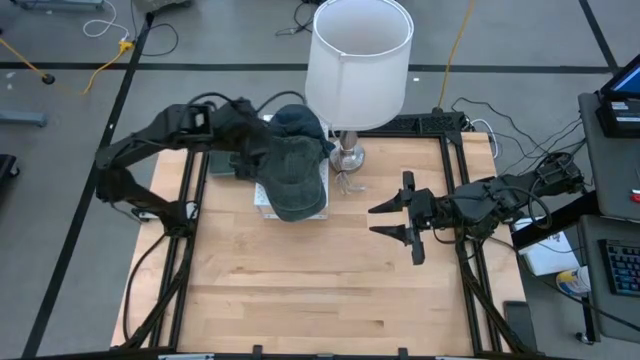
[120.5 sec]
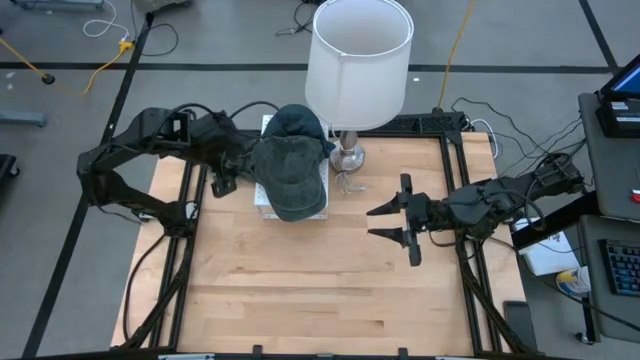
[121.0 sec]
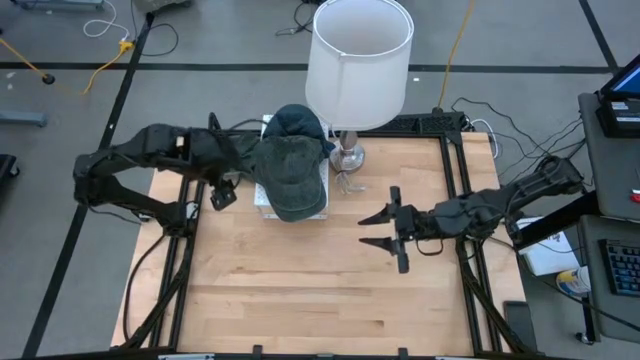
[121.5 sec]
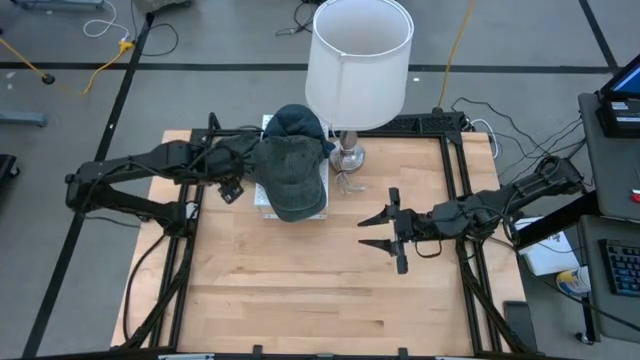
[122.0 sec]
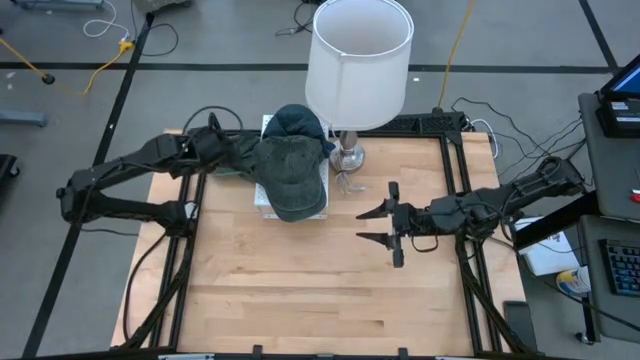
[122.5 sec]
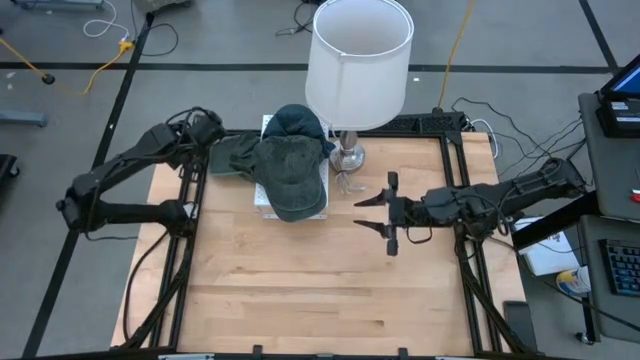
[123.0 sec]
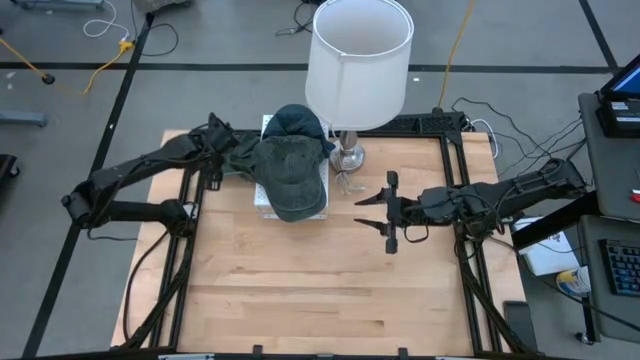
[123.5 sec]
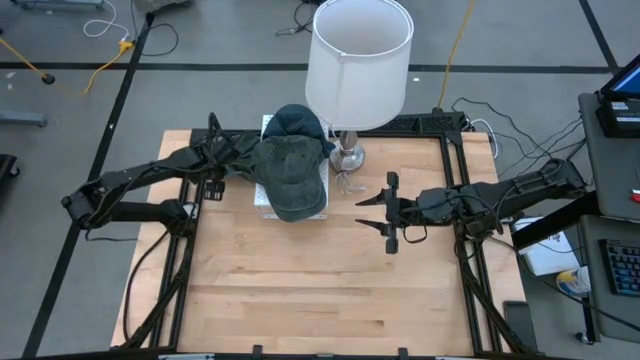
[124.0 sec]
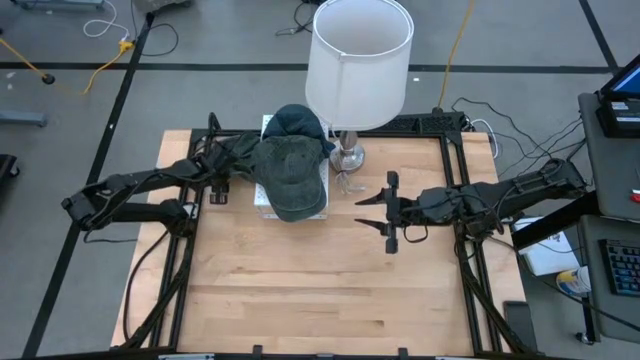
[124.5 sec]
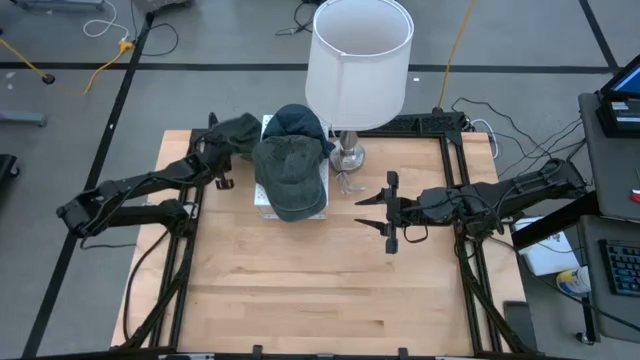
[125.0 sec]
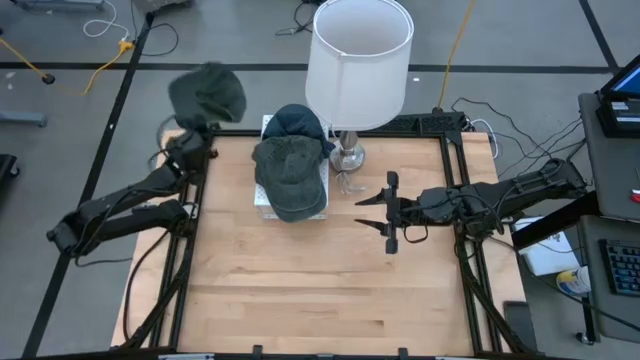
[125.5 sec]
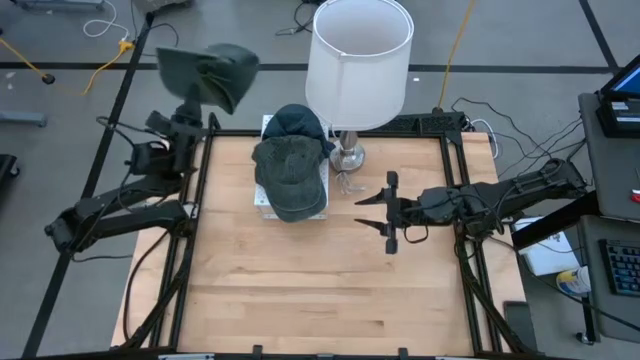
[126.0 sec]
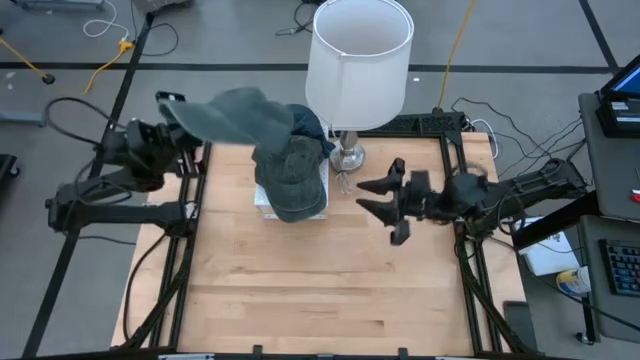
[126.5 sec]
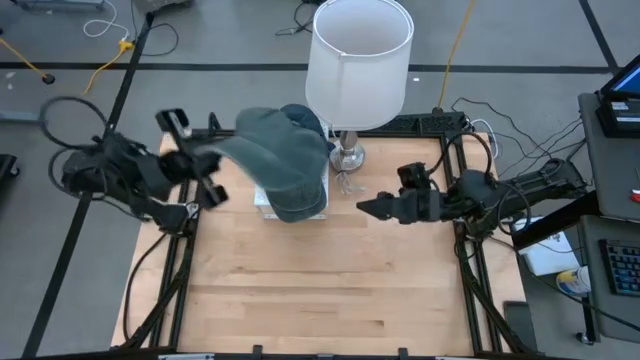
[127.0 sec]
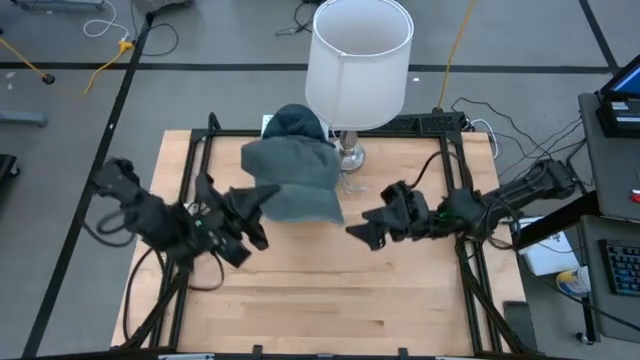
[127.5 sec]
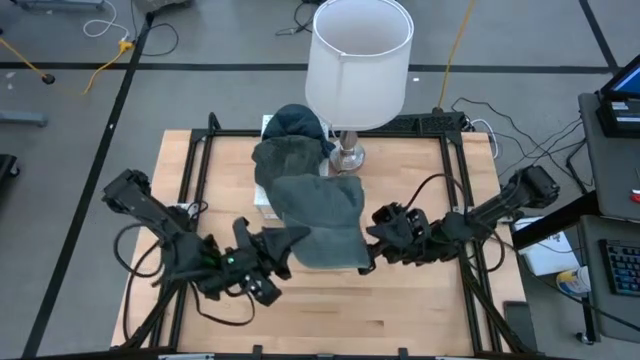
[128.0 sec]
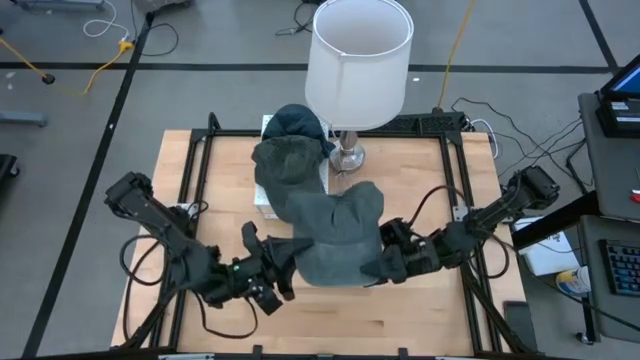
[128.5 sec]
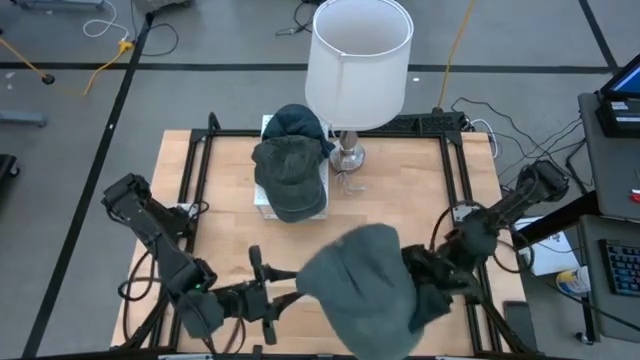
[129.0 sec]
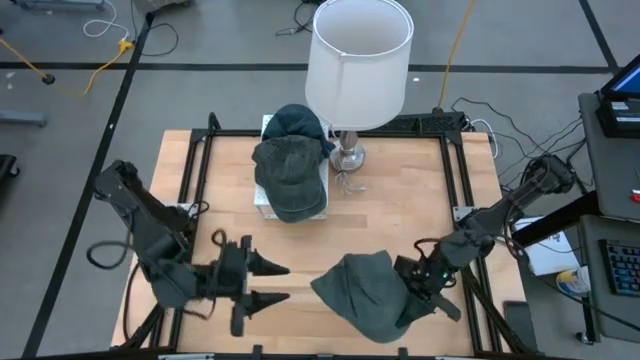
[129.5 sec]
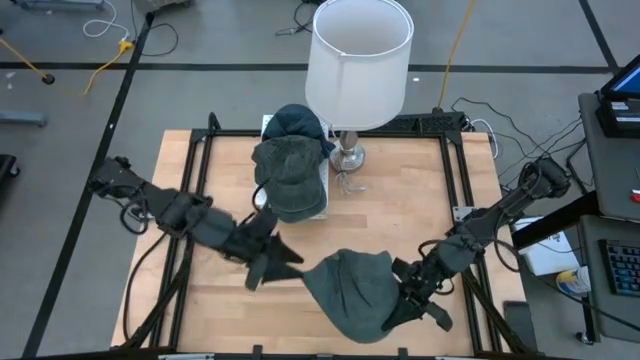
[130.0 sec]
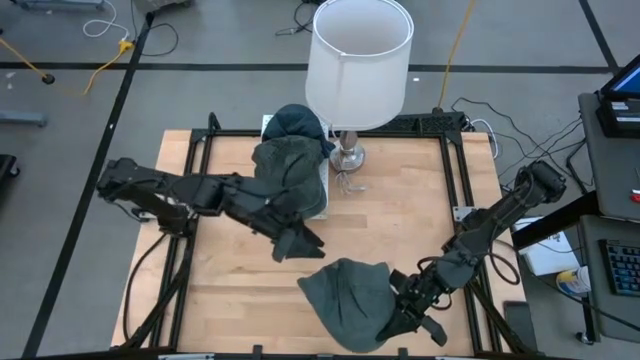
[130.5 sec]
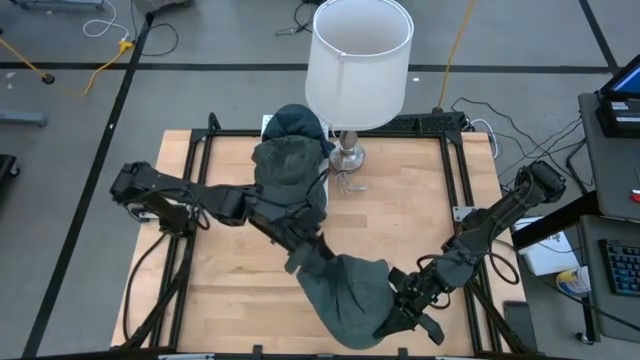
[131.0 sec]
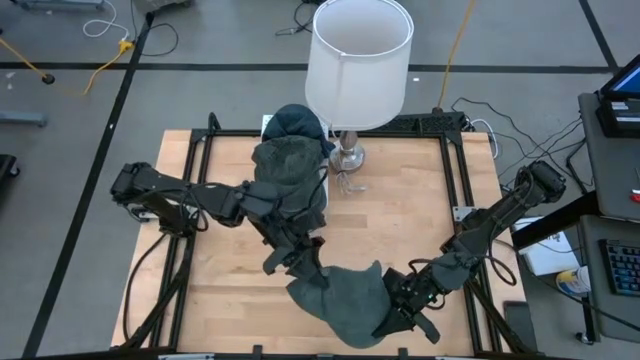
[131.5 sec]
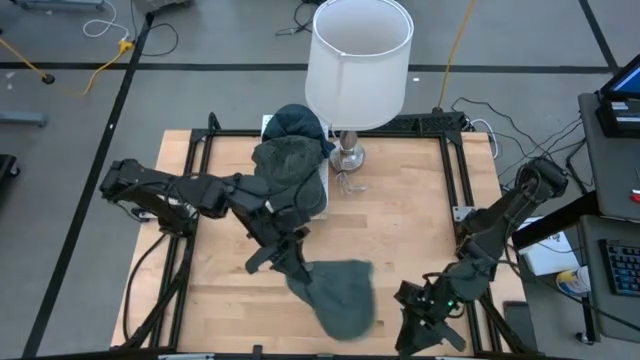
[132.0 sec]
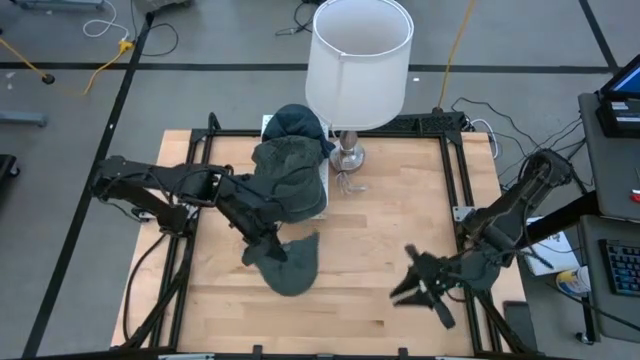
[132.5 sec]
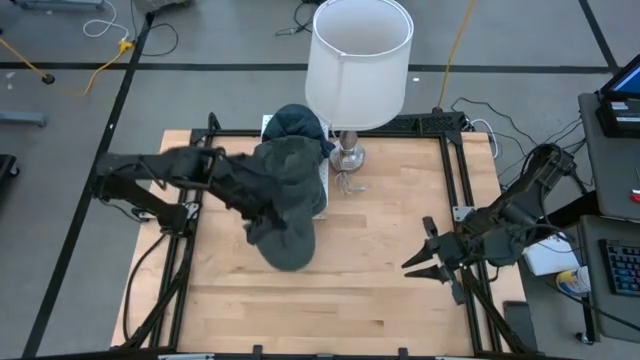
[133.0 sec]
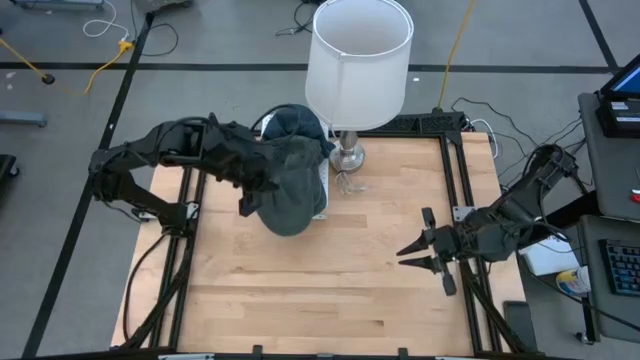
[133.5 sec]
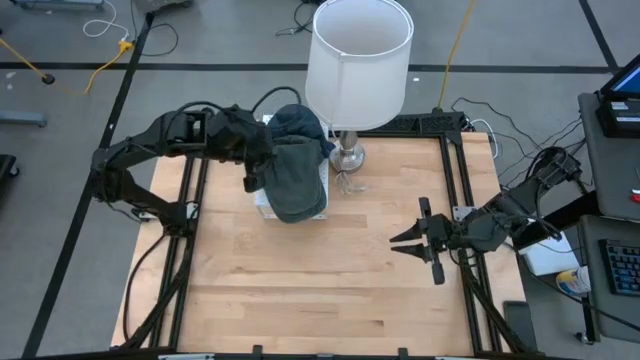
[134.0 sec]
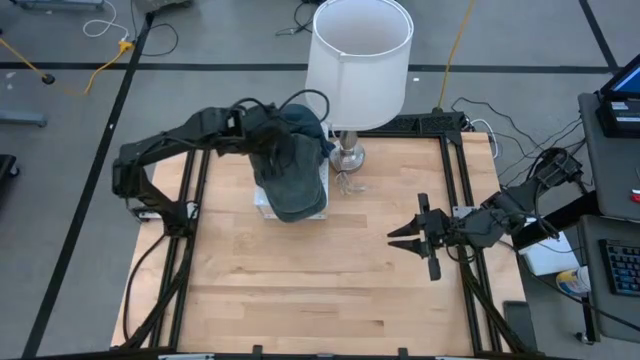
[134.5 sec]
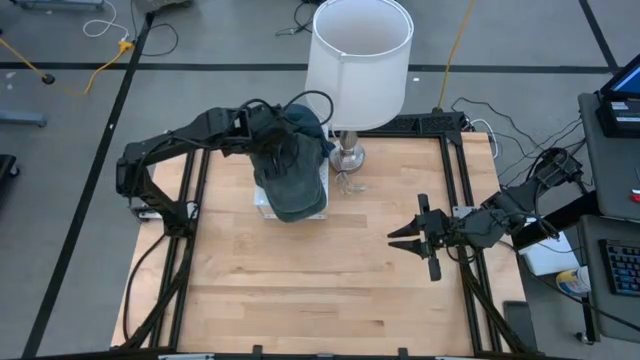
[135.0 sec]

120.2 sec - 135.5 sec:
Task: Pick & Place hat
Stack the gray cap on the gray caps on the shelf

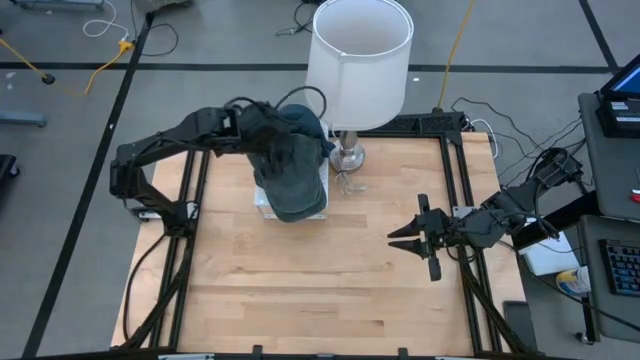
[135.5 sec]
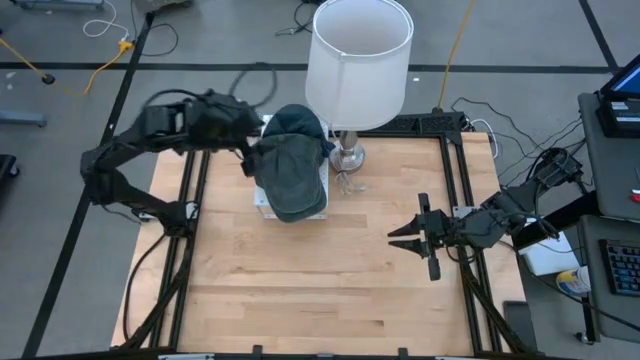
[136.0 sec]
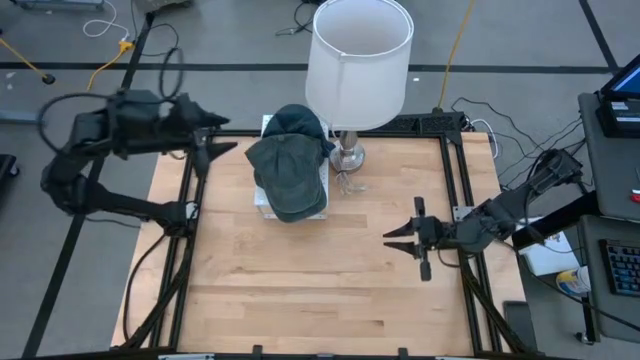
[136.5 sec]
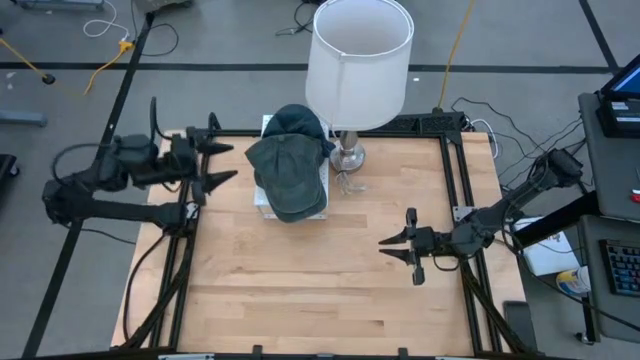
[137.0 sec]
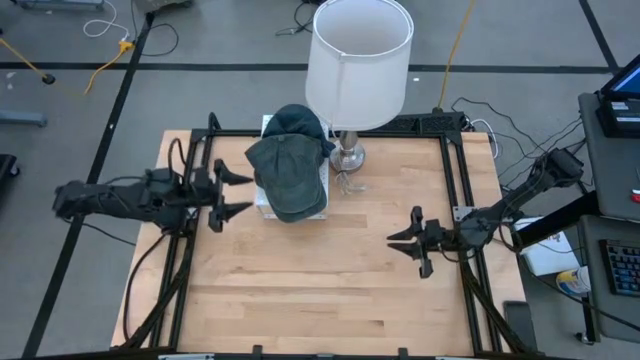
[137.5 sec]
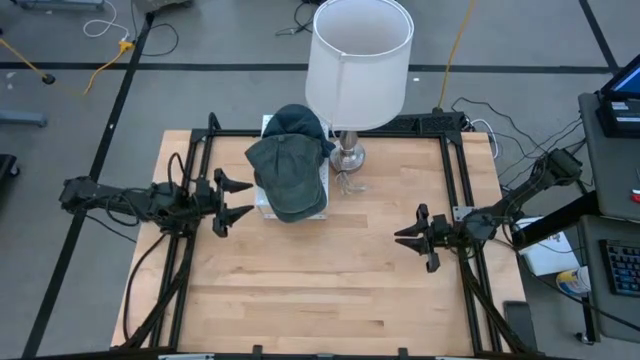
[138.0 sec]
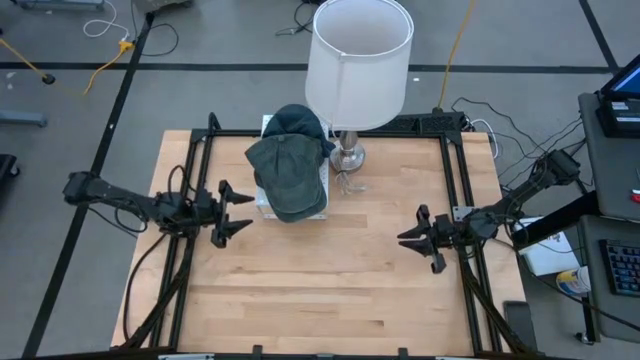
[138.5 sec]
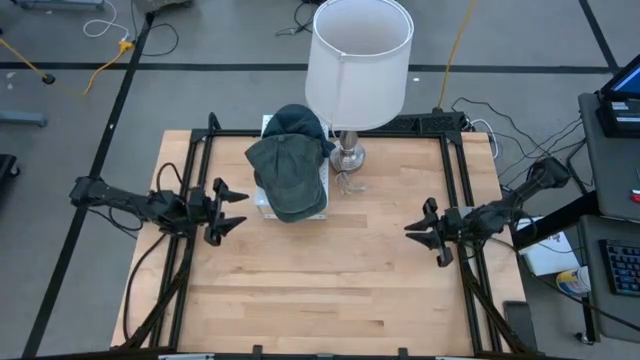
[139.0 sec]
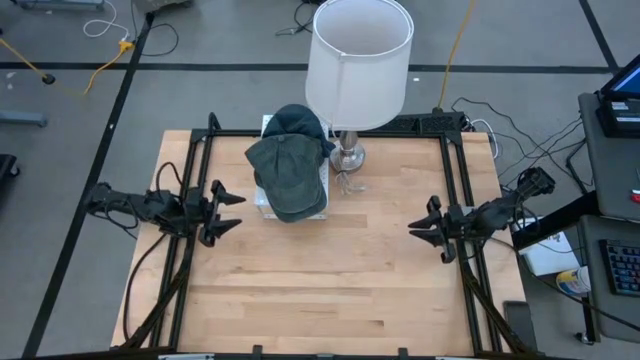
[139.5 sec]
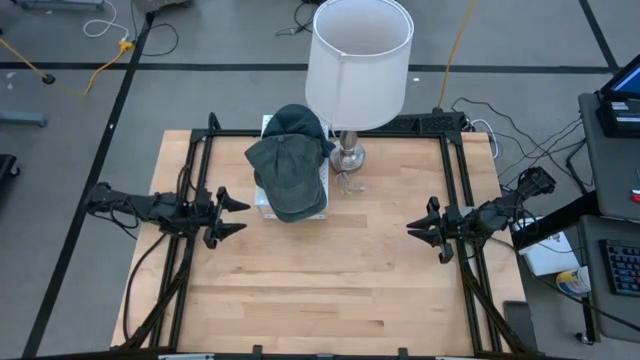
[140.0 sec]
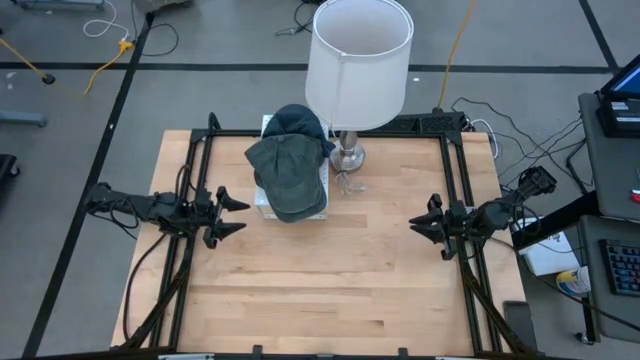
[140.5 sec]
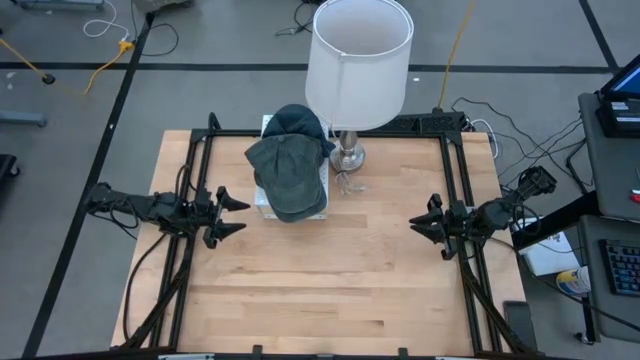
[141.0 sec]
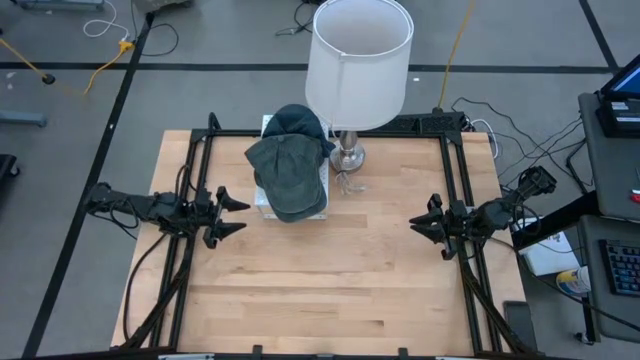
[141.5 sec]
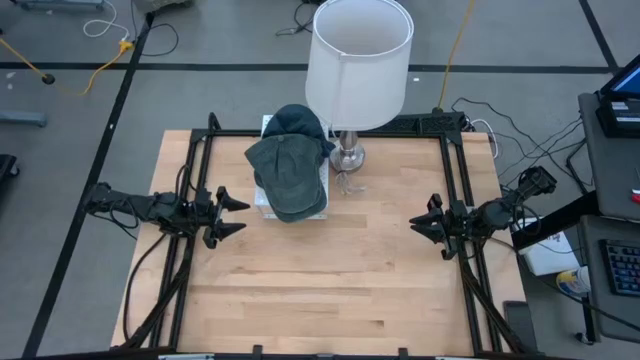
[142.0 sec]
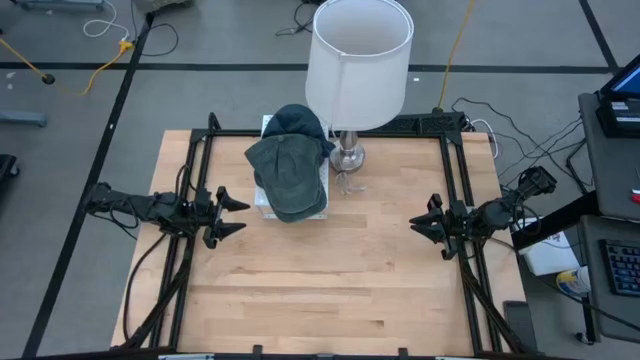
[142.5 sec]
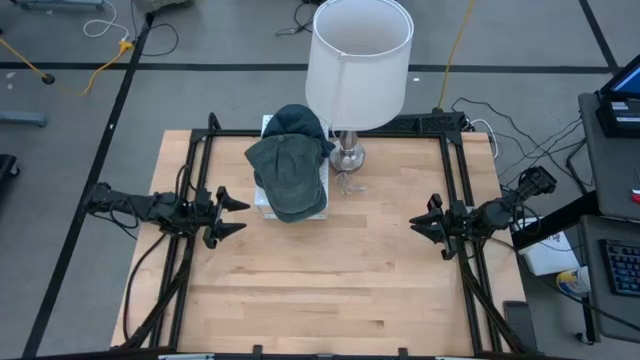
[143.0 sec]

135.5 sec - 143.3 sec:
Return to Home Position
